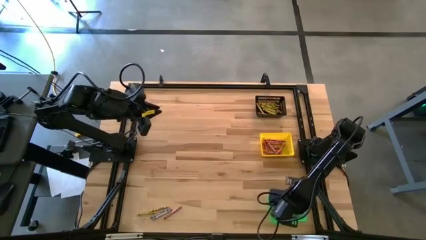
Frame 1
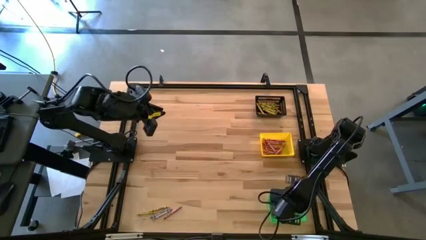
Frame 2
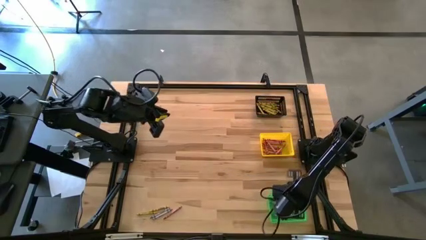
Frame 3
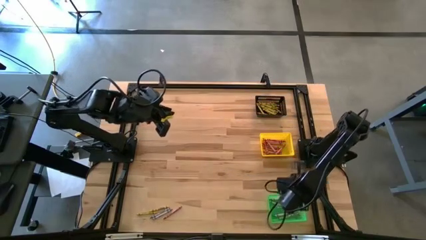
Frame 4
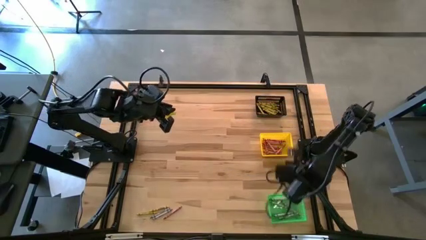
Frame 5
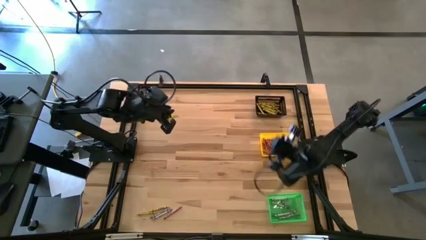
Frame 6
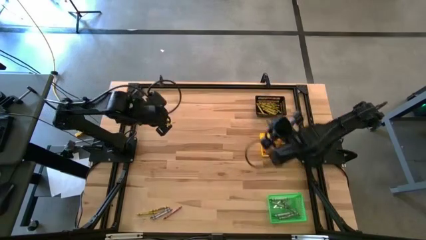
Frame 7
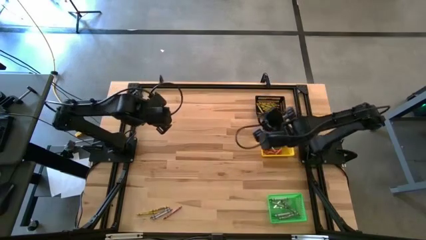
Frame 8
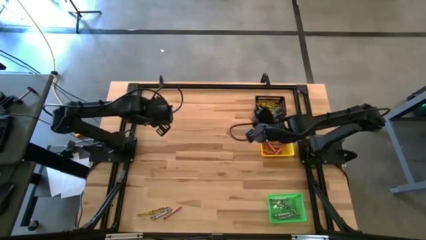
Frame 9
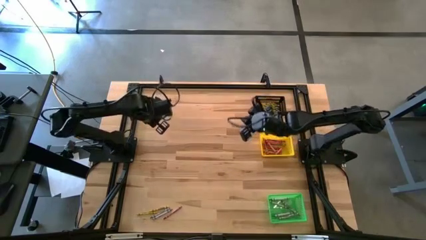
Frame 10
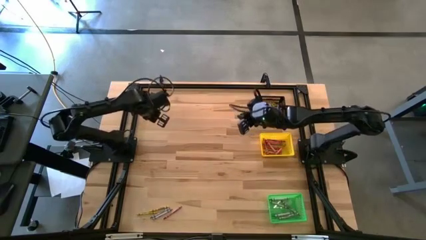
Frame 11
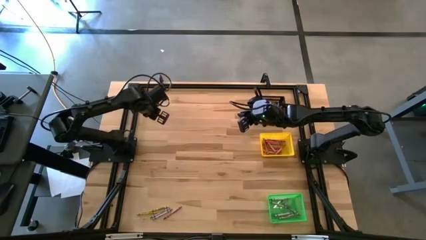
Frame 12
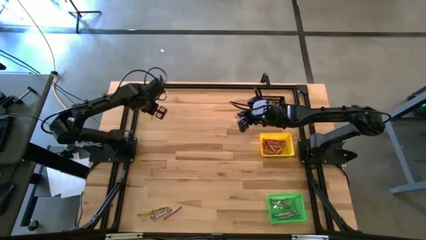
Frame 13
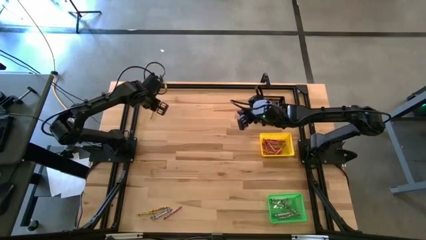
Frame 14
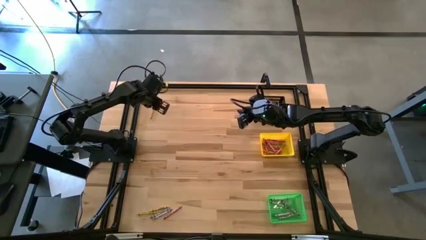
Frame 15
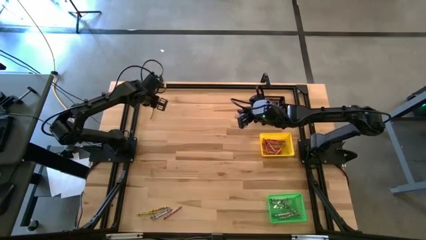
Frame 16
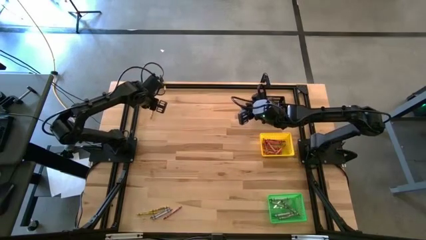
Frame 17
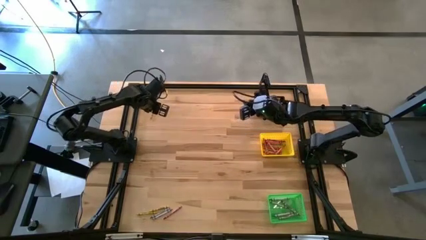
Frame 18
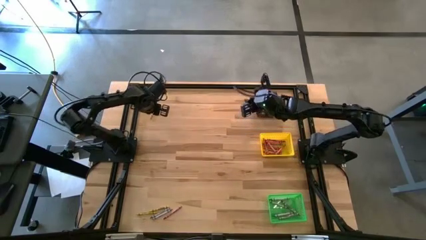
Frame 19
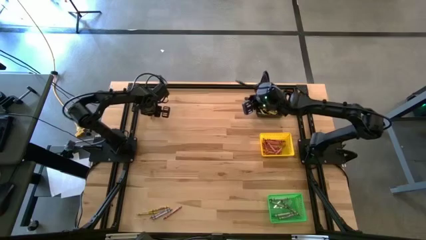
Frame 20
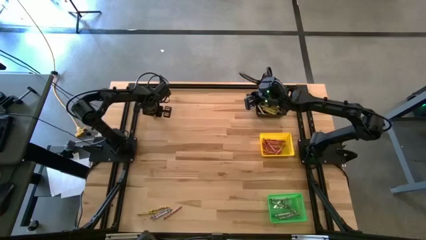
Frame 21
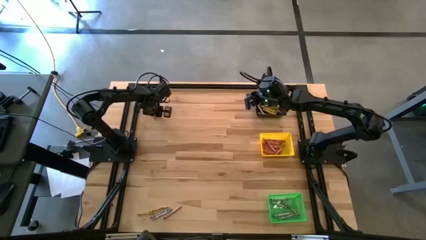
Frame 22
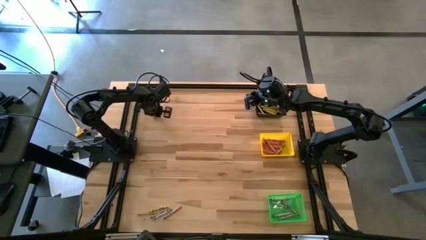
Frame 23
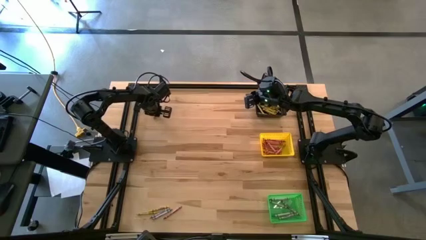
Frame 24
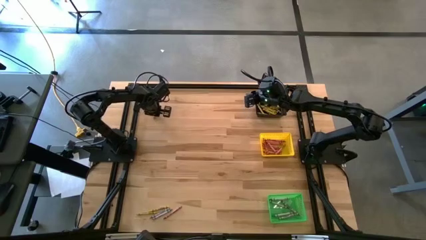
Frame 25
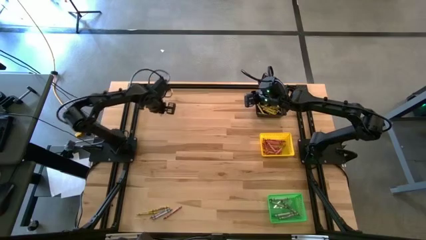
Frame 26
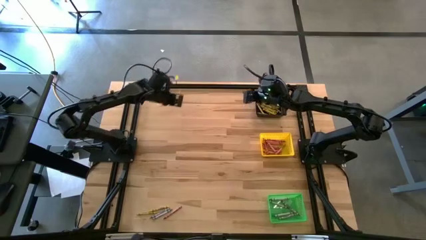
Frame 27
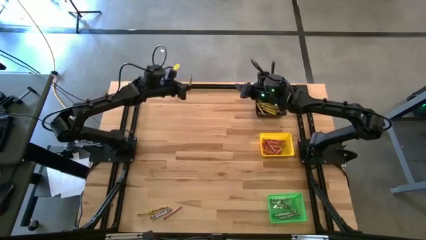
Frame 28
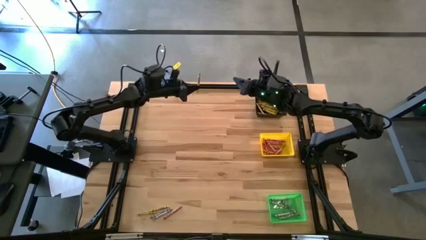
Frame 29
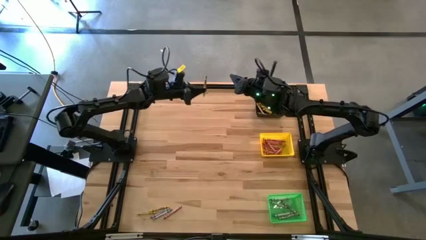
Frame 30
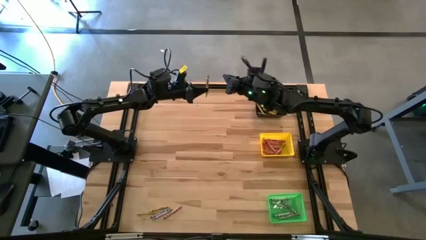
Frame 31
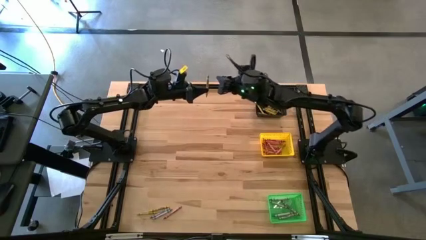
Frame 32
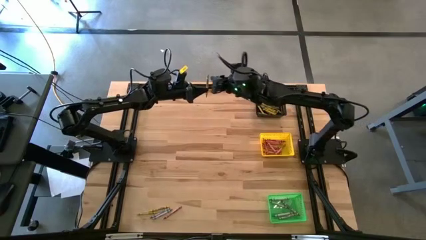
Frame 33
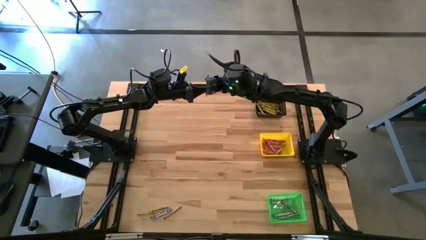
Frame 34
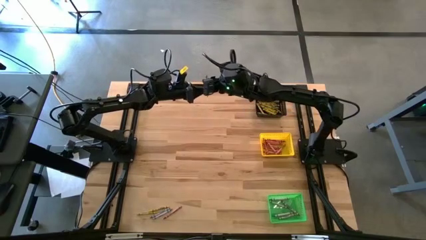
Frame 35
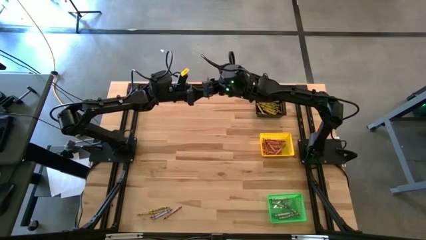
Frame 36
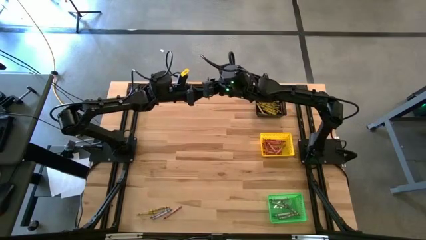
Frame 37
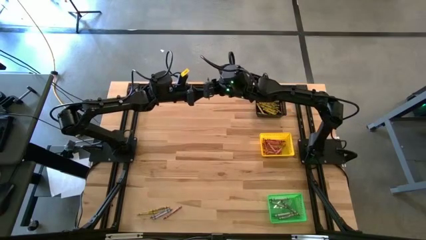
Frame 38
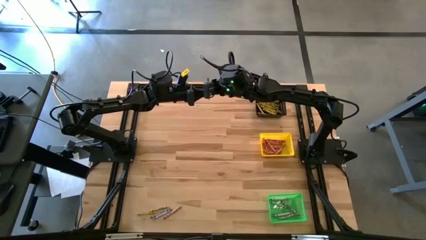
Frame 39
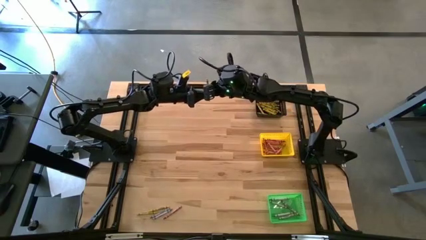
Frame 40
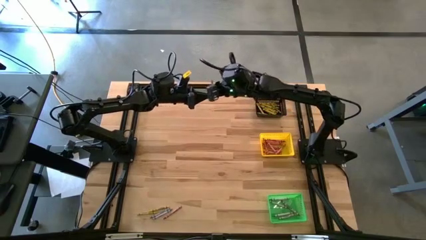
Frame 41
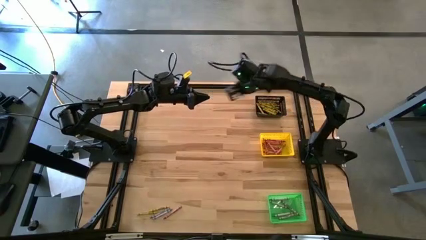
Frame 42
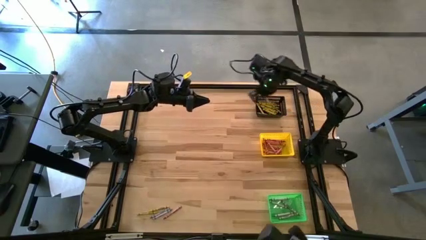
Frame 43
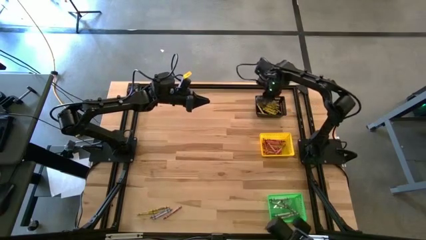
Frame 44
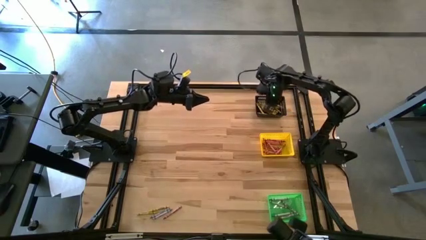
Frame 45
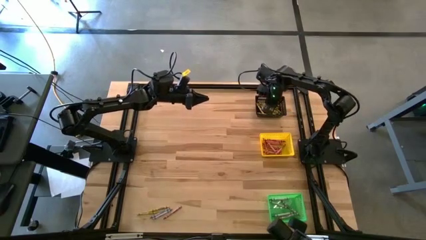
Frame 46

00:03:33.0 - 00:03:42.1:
Task: Sort crayons
Put the yellow crayon into the black bin

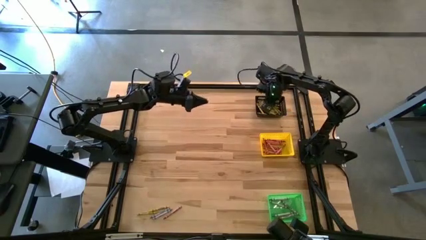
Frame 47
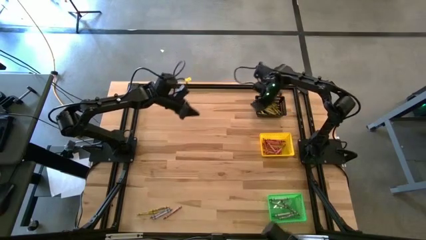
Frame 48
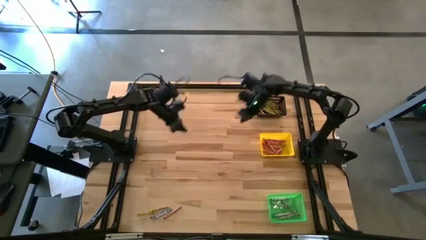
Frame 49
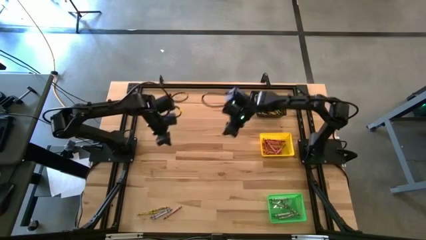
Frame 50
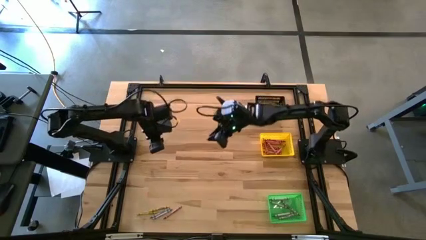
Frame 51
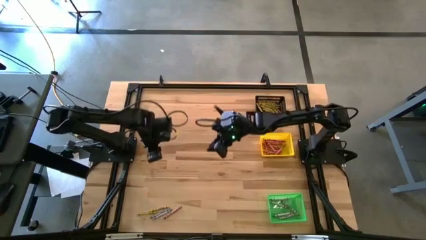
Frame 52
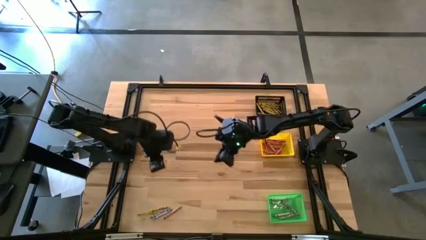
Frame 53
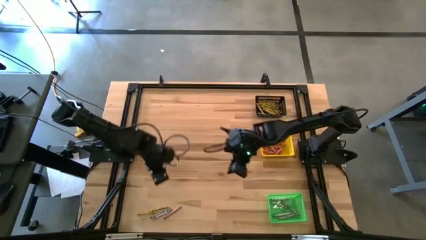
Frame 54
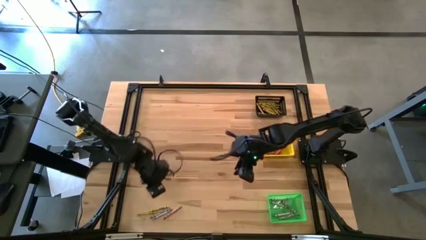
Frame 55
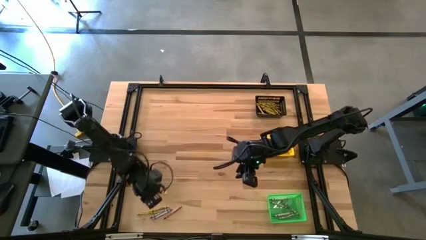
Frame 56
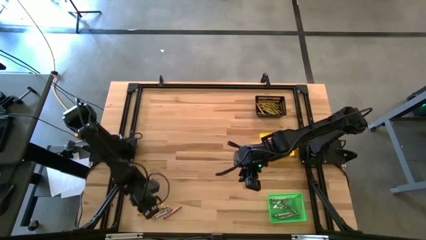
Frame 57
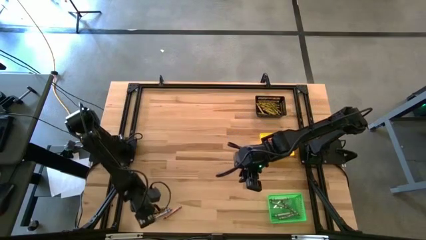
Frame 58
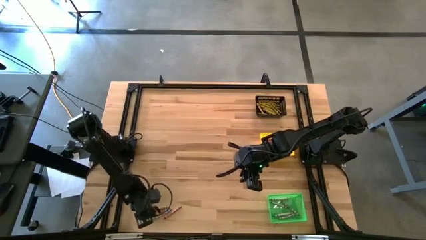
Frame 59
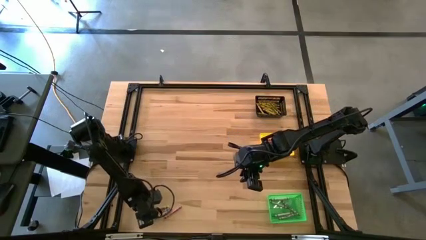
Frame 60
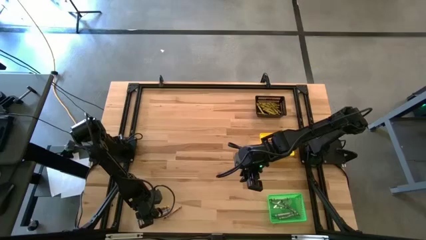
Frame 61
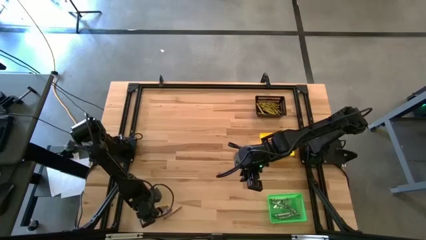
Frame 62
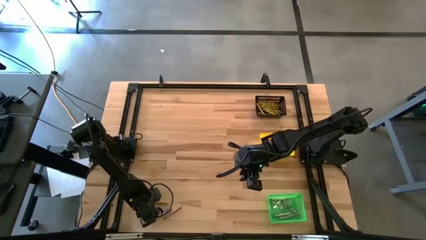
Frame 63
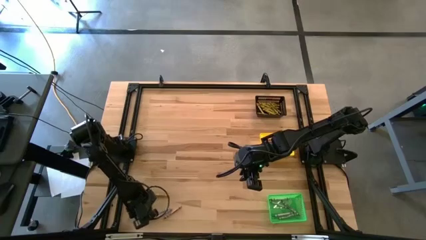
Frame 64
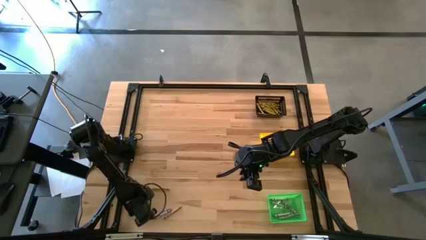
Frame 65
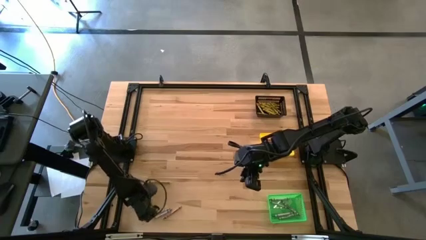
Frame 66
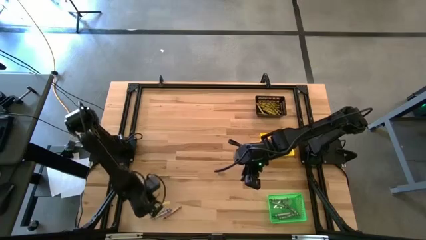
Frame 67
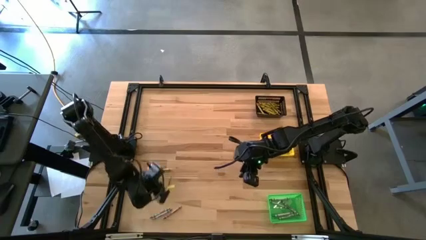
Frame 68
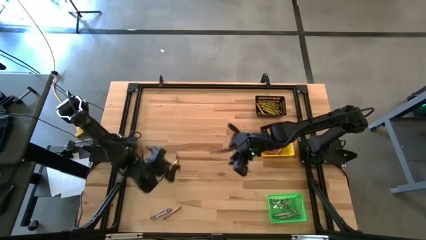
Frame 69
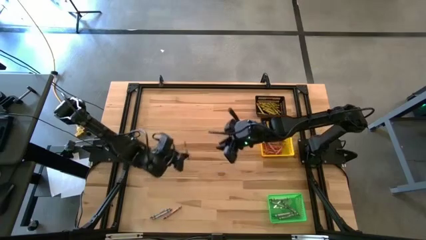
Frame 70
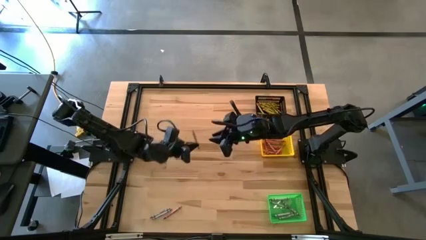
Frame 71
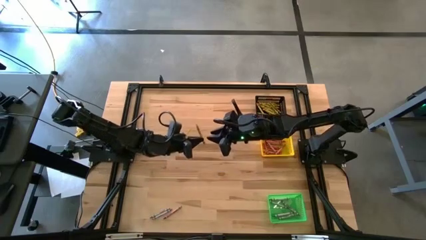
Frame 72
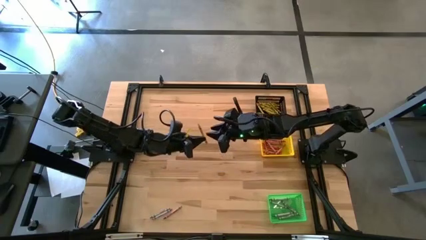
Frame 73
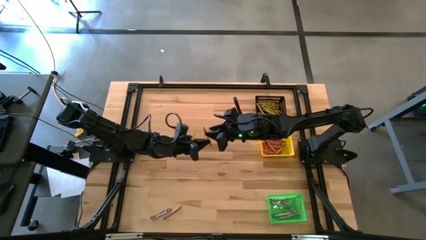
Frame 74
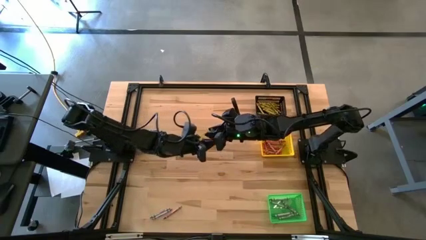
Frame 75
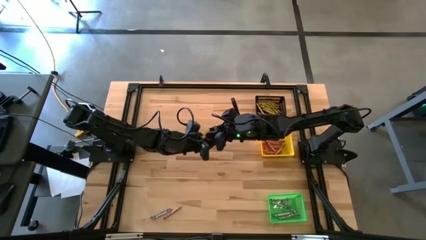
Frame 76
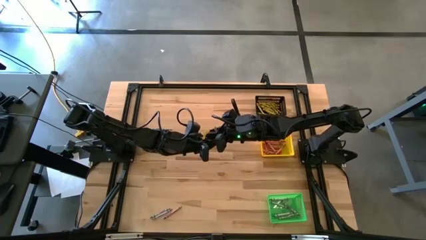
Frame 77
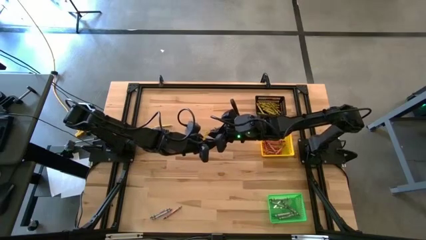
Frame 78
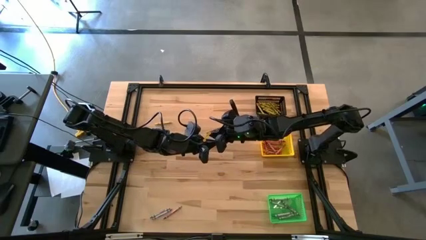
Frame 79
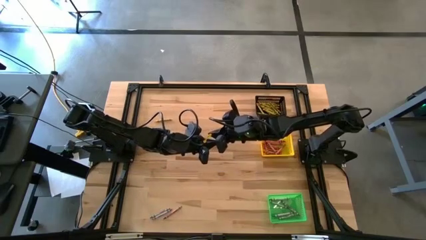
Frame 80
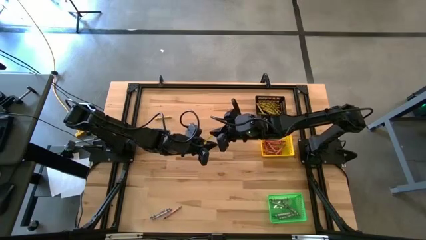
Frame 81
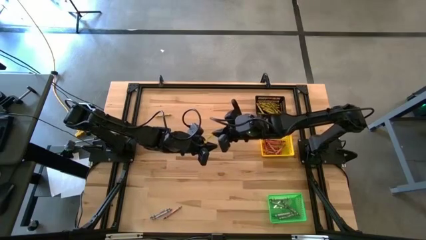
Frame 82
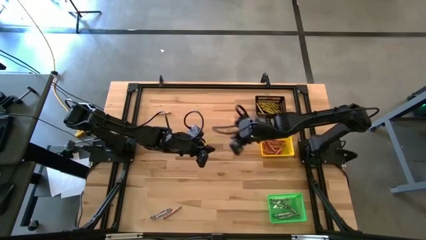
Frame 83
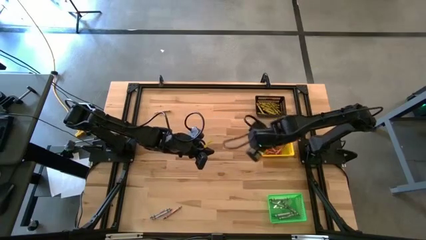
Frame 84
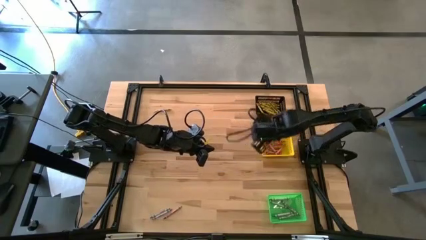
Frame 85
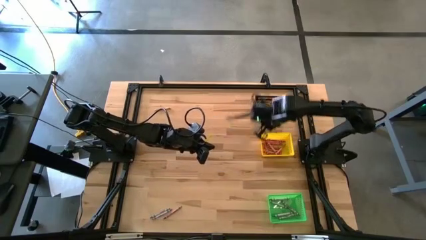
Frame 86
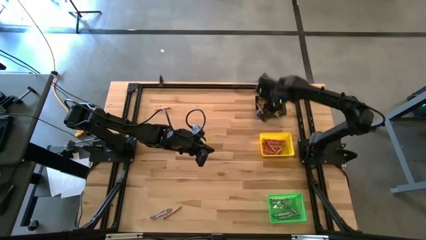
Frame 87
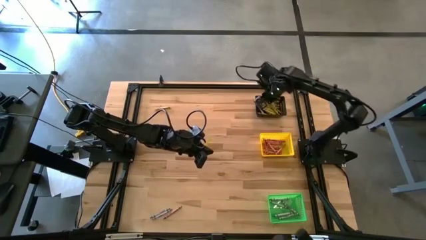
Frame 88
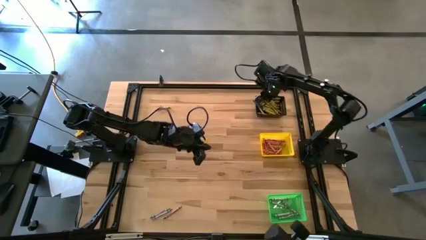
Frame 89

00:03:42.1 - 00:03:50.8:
Put the yellow crayon into the black bin
